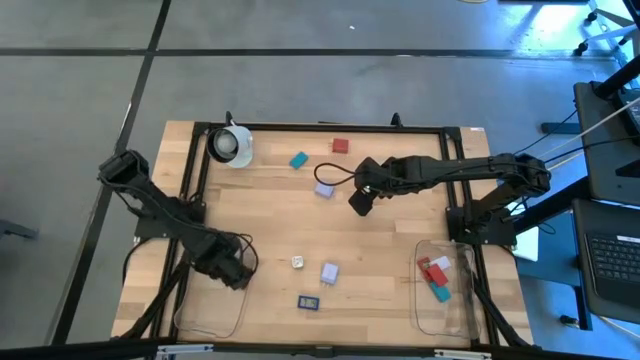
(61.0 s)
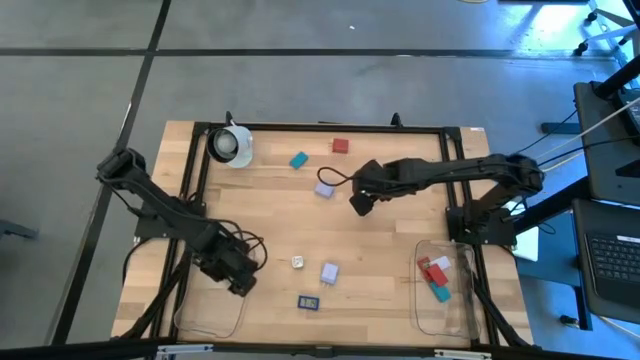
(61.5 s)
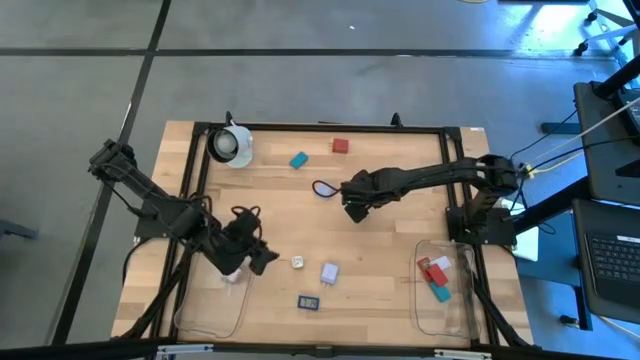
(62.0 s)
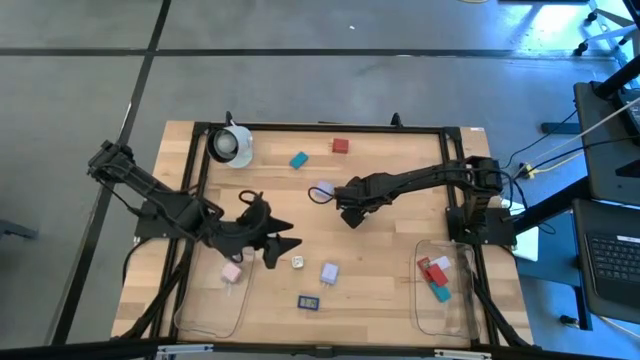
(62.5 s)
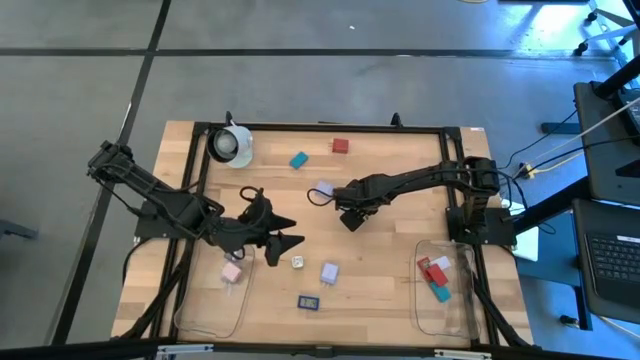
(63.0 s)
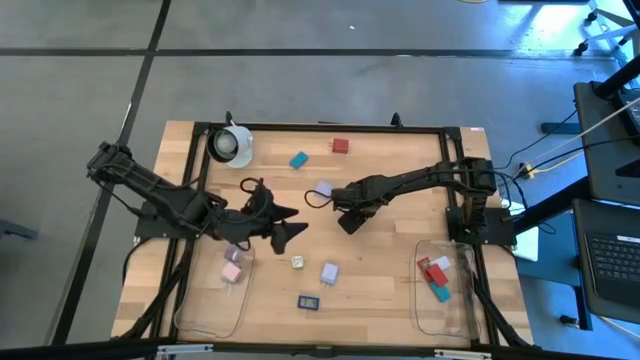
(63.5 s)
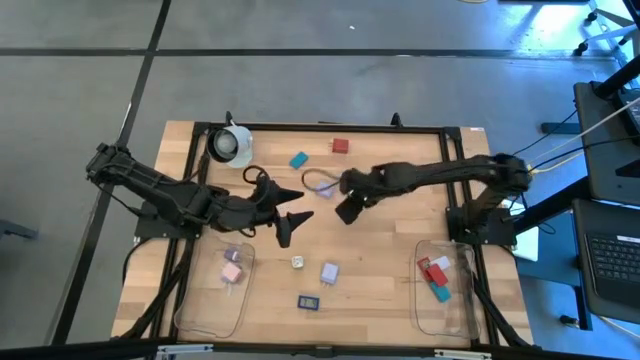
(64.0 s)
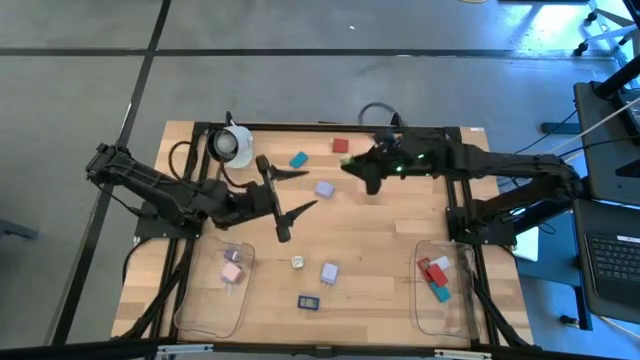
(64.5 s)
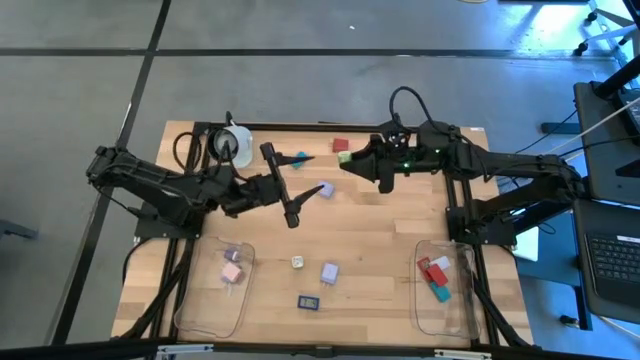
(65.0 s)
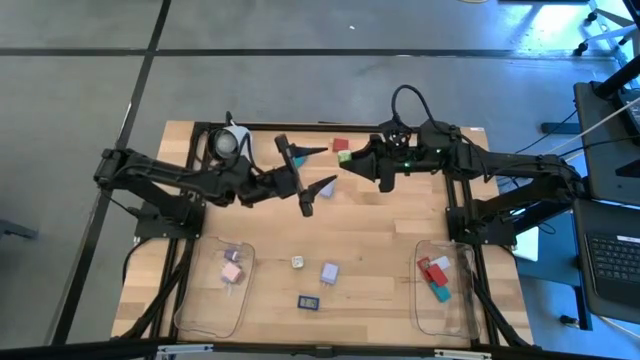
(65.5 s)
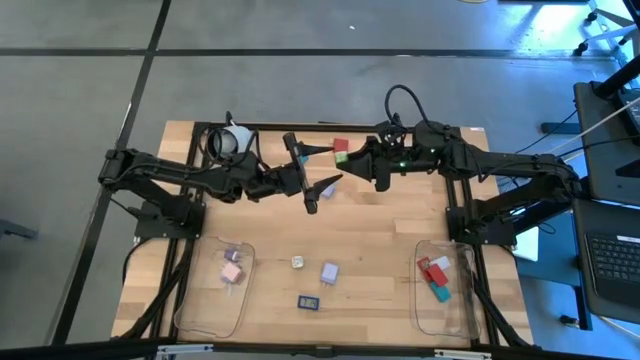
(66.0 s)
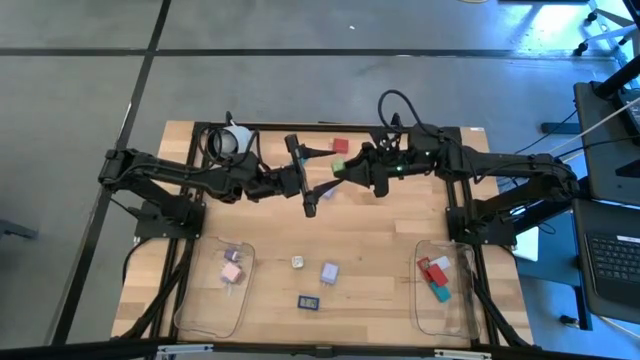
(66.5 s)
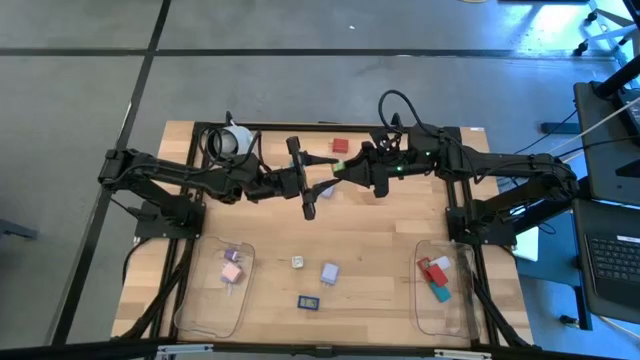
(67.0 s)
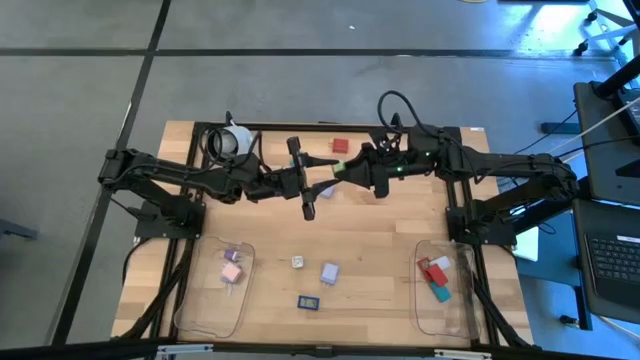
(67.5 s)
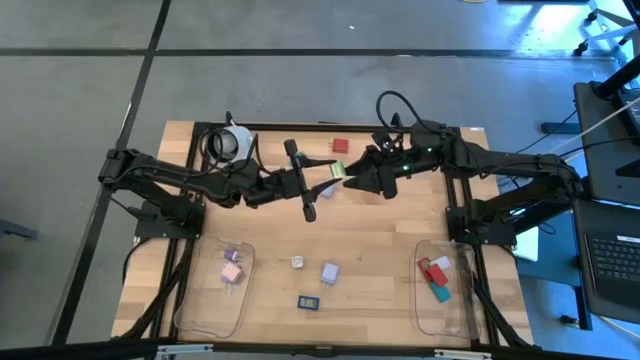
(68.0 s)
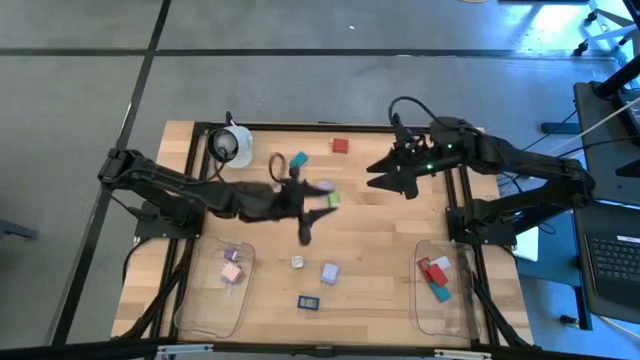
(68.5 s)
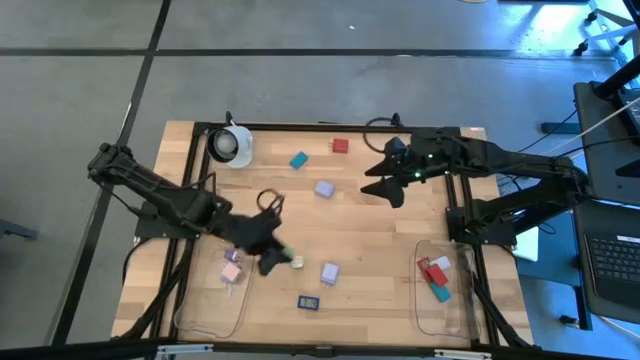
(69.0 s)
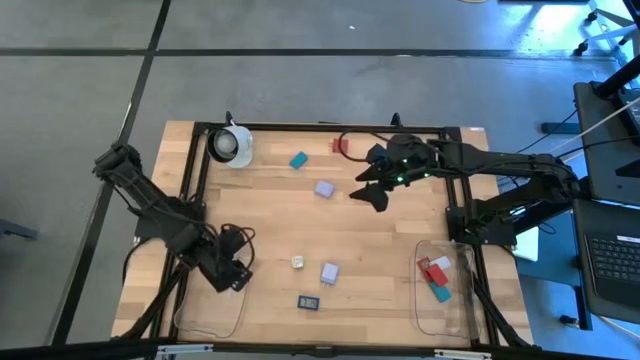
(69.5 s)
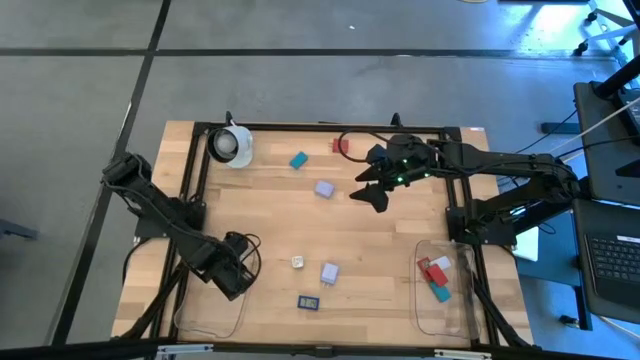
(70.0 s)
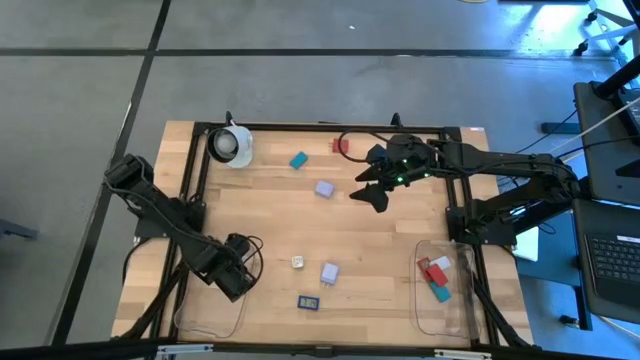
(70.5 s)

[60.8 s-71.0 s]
Task: Pick & Place Office items
Put the top green adapter into the left transparent bin

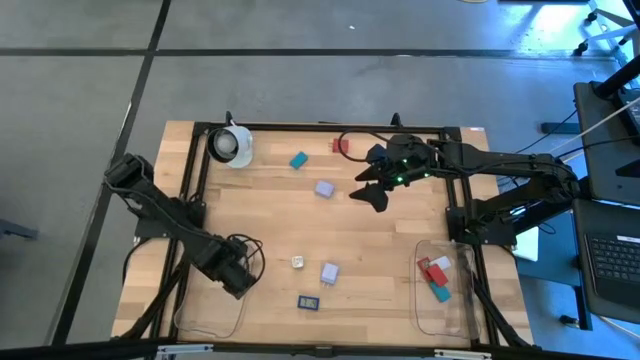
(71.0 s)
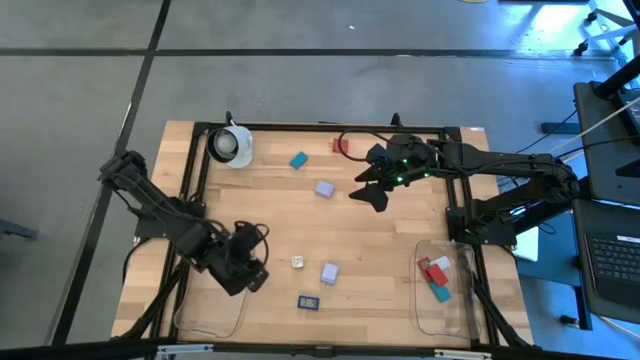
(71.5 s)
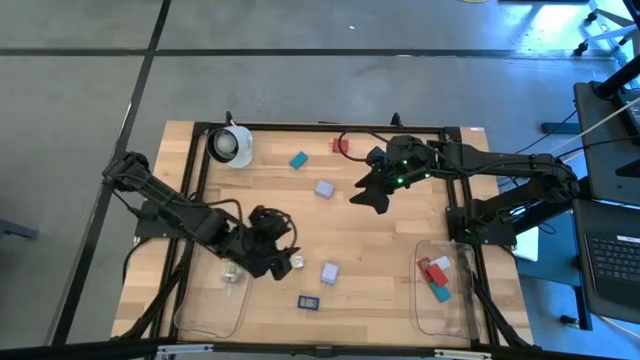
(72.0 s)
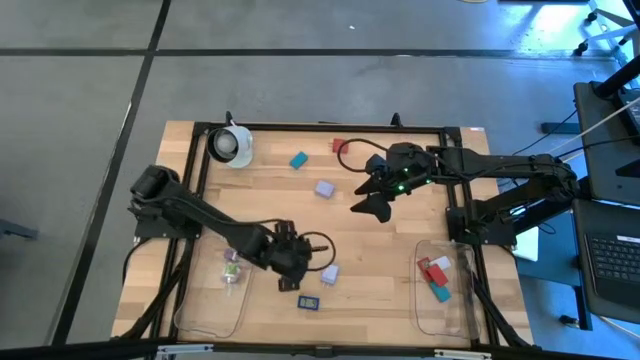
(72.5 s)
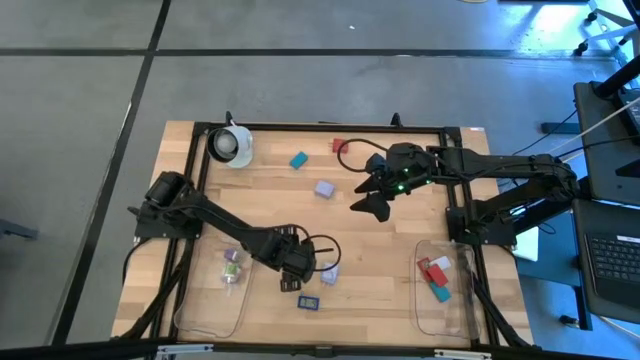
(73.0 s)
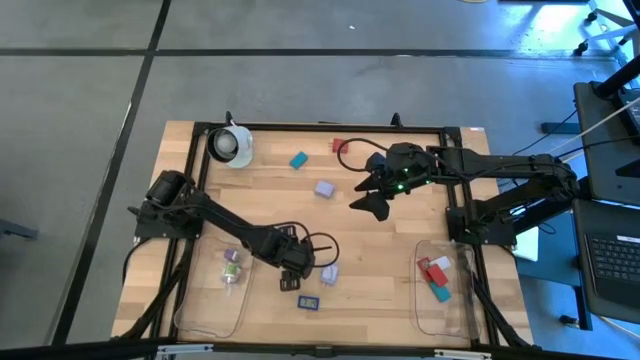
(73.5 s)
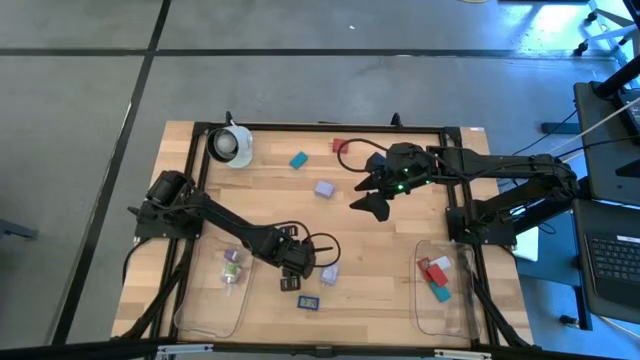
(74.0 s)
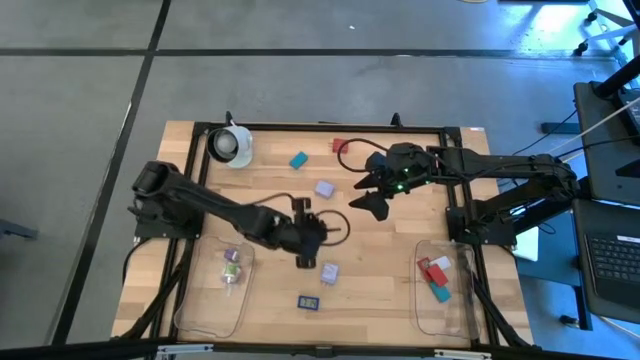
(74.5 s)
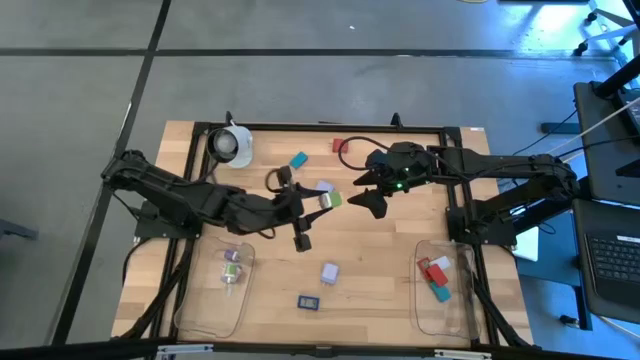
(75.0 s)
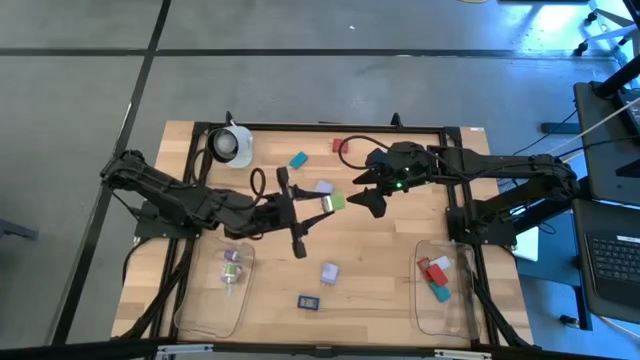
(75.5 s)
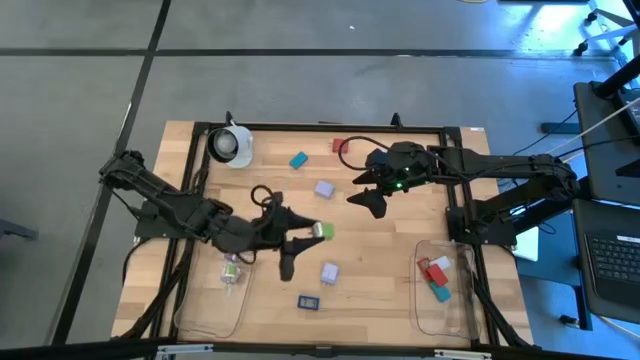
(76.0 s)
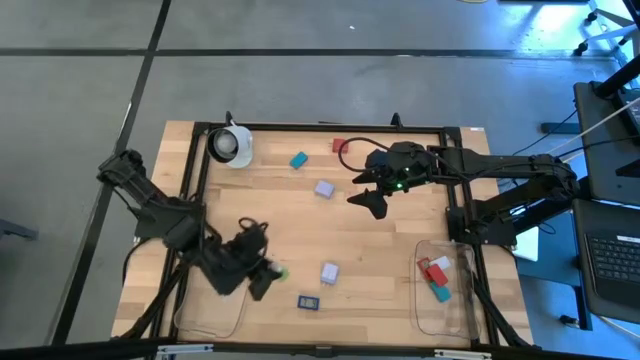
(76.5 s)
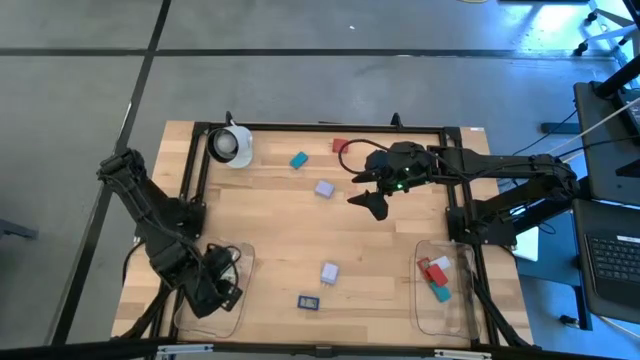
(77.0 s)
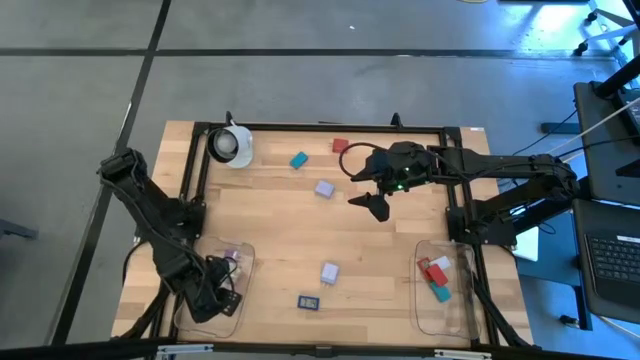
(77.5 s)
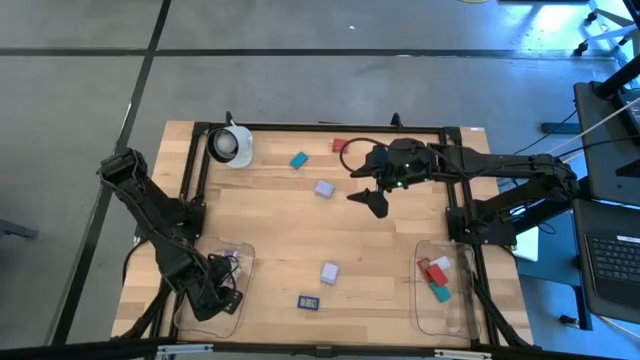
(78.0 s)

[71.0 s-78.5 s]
Put the green adapter into the left transparent bin

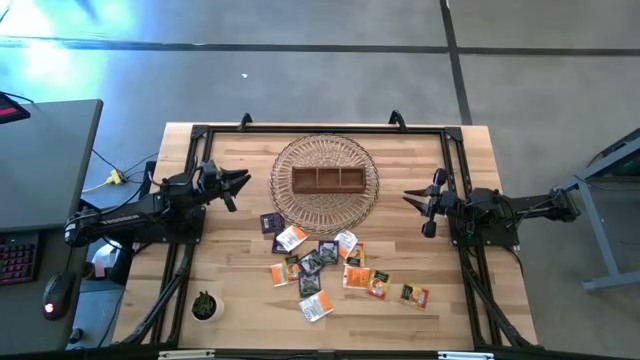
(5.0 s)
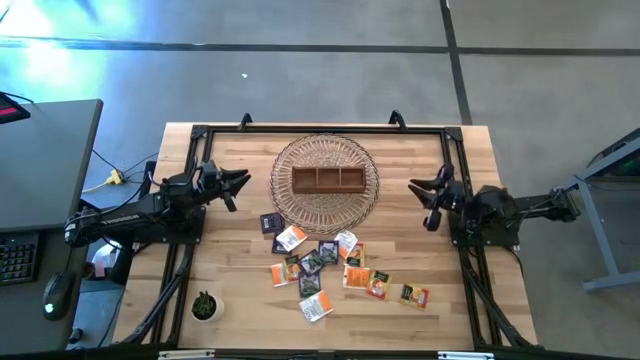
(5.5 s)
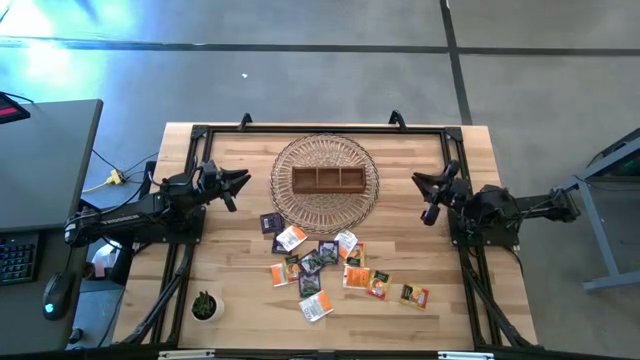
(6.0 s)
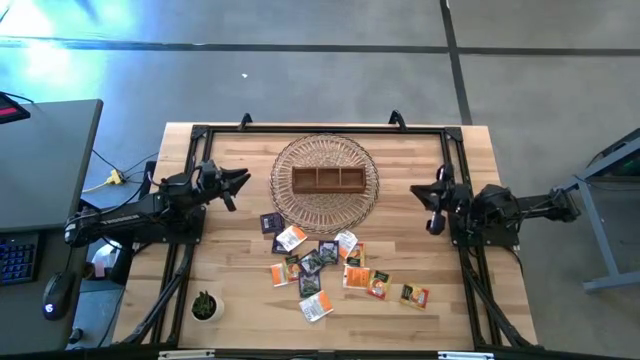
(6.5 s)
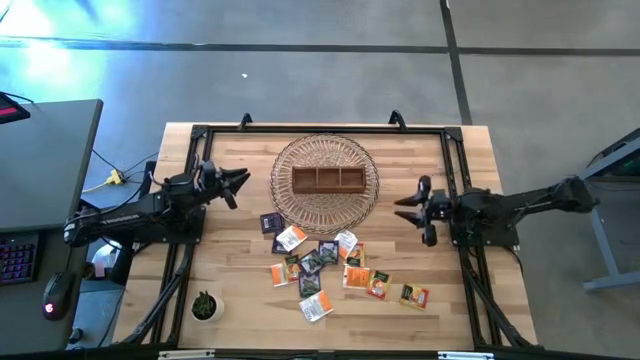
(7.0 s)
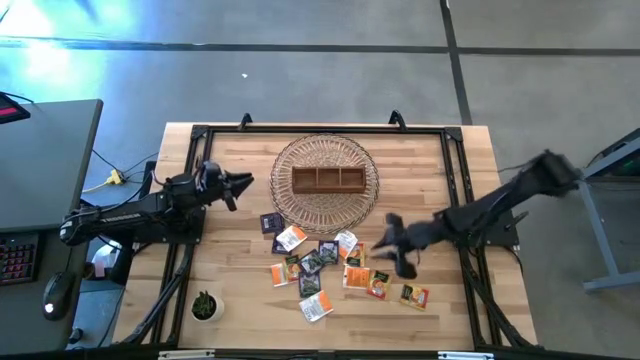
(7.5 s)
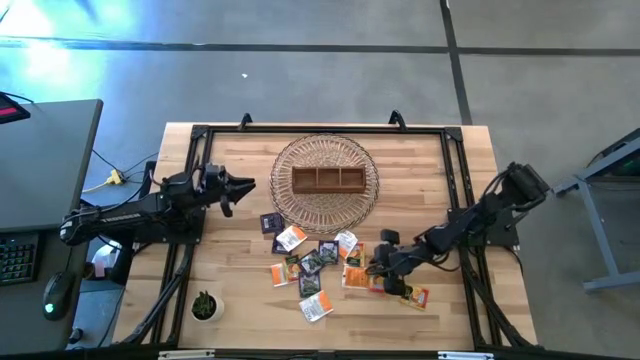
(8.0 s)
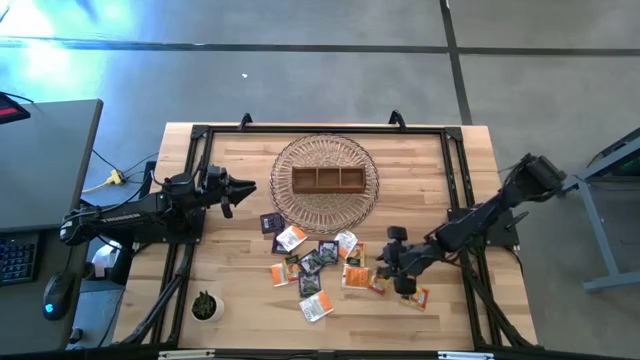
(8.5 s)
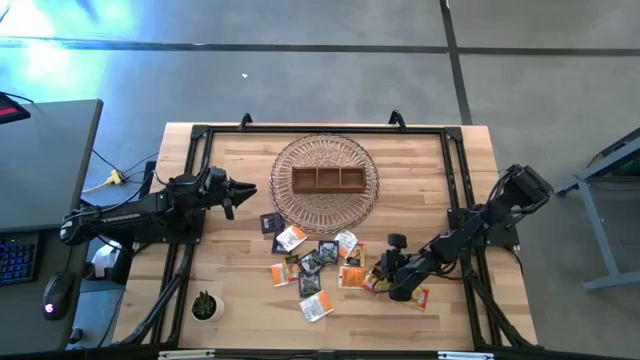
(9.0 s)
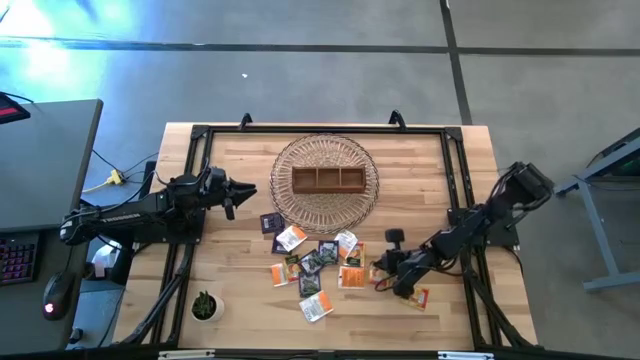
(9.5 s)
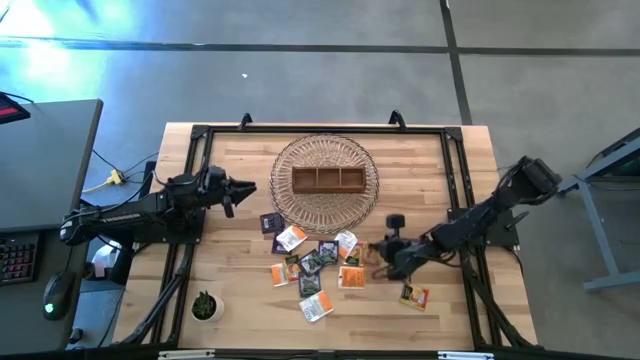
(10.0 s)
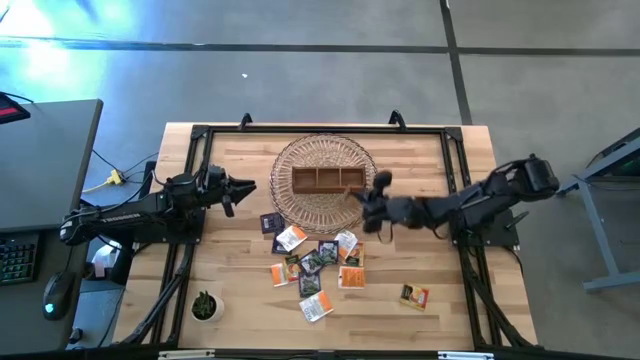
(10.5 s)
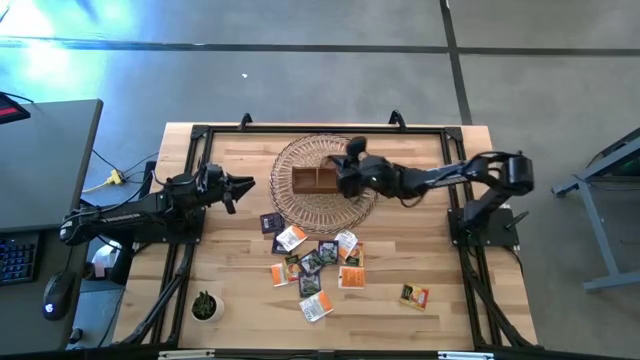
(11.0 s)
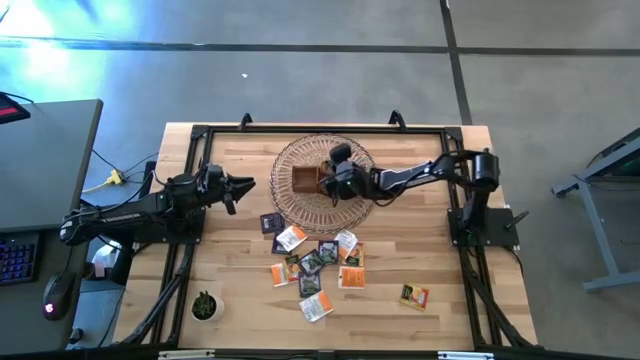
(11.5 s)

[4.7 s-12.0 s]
Task: Pick & Place Tea
Put the orange tea bag into the middle section of the wooden organizer
